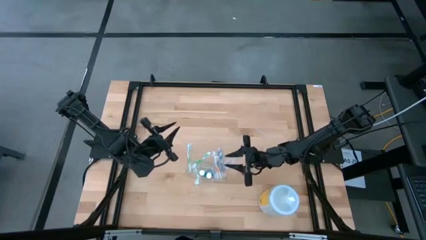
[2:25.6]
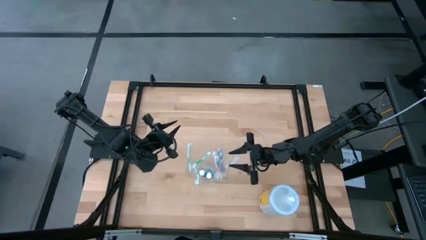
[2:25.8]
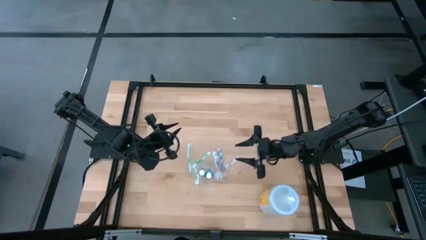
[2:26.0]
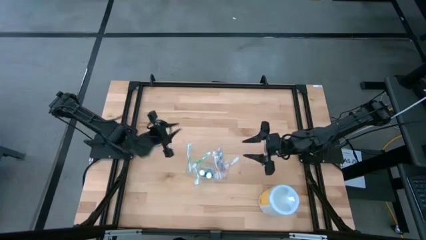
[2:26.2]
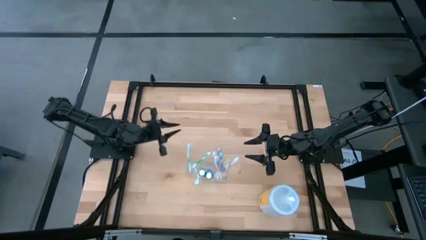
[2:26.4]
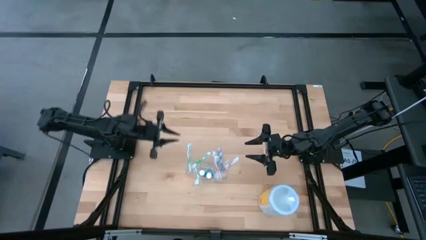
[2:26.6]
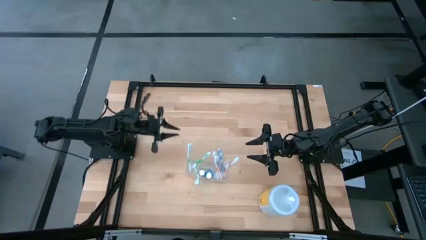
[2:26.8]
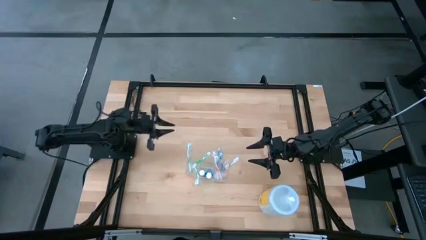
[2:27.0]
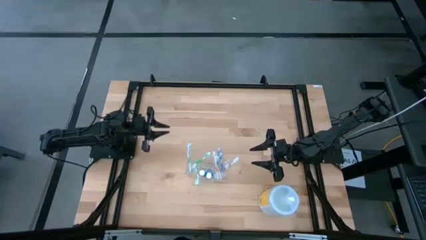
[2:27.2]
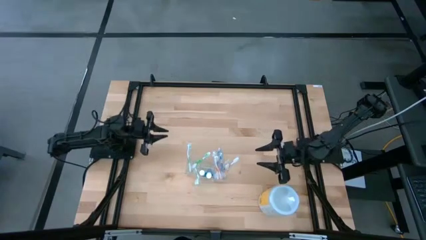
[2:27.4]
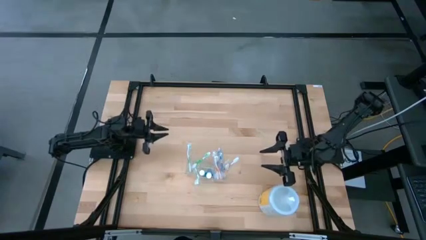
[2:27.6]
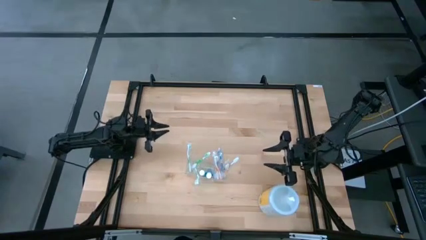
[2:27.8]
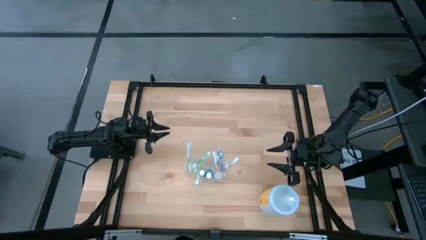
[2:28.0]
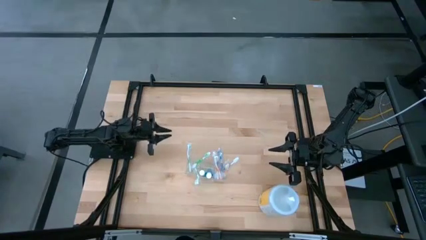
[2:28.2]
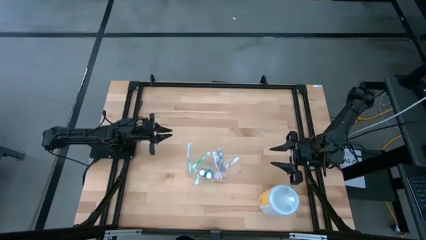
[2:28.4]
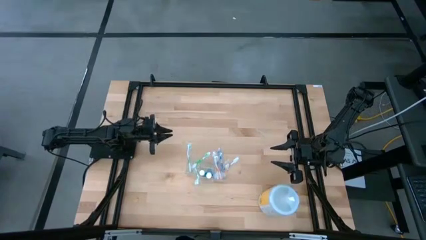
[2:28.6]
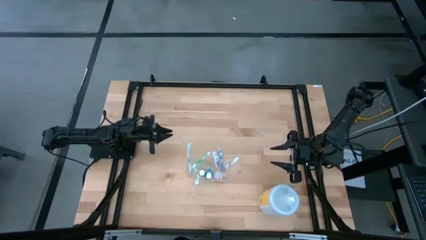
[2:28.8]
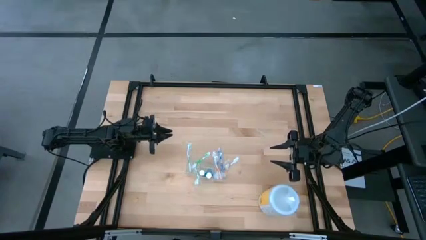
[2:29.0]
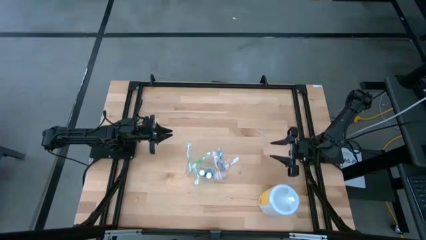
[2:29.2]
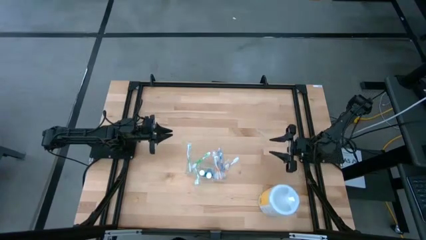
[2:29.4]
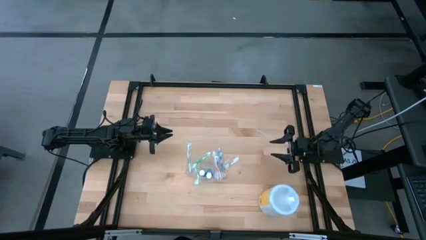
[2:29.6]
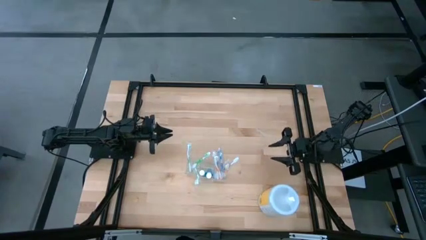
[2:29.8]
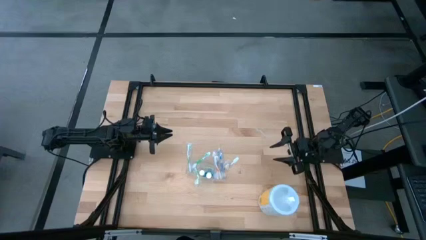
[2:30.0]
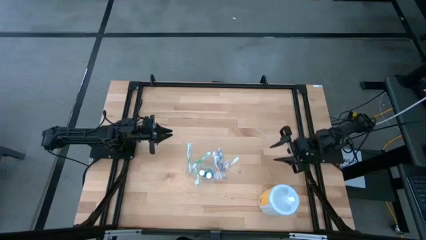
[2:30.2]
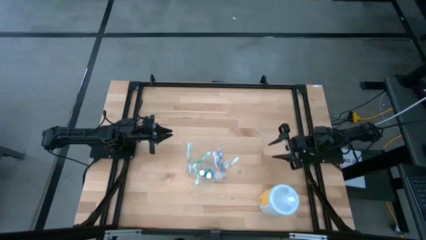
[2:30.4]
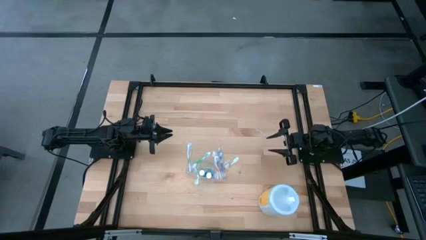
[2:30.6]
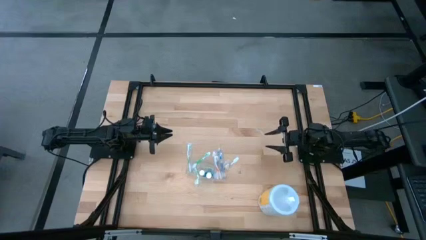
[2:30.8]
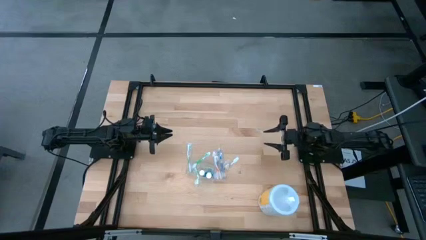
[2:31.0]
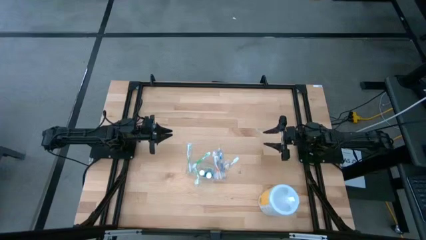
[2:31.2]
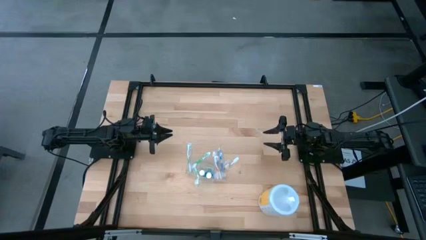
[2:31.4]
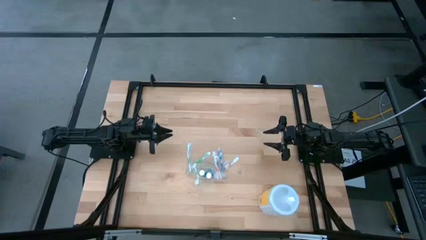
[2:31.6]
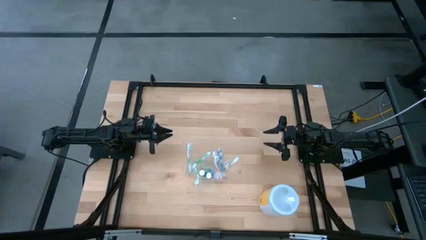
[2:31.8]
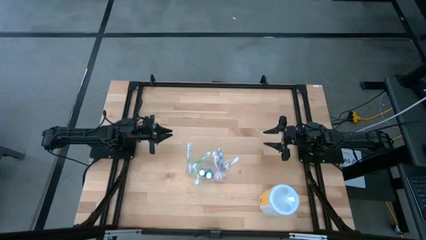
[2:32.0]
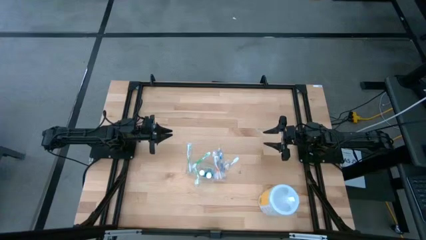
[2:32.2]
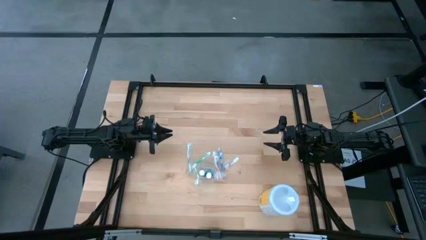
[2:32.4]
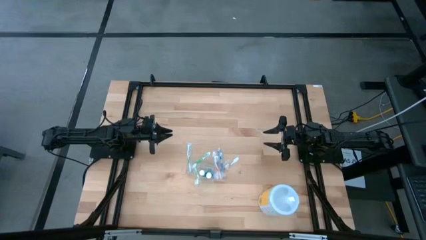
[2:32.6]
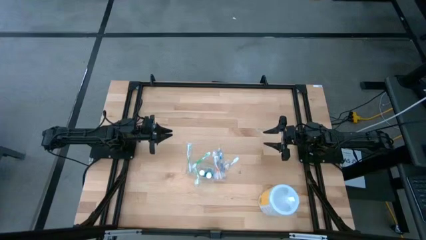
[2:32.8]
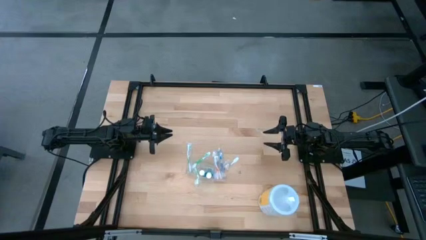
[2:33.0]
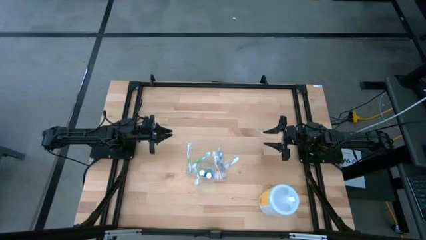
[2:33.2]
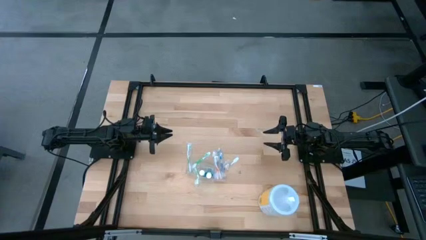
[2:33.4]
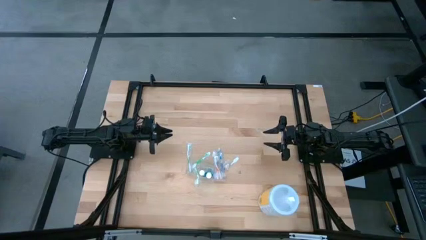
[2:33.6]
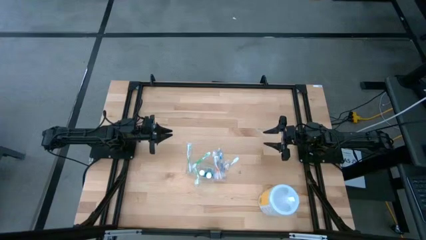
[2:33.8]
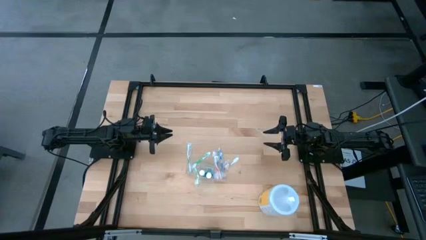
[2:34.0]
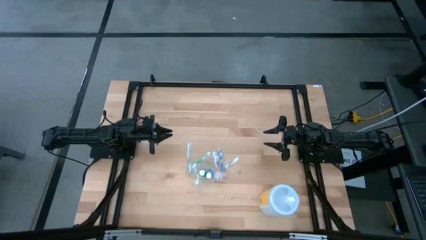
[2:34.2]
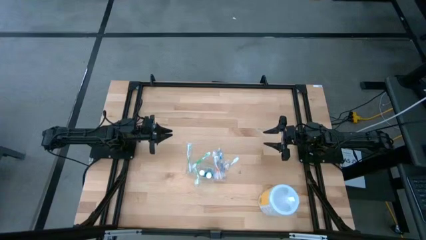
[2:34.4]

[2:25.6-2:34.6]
Task: Pick & Place toothbrushing station
Return to Home Position

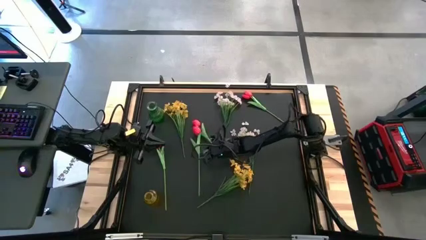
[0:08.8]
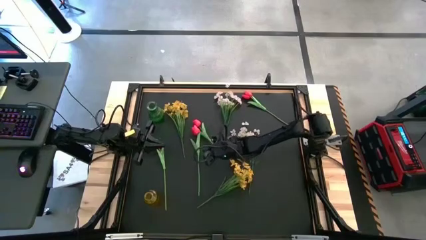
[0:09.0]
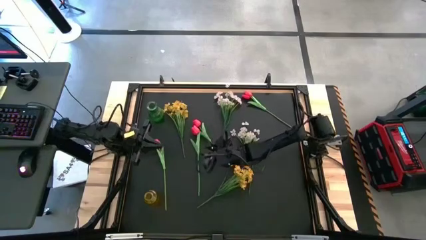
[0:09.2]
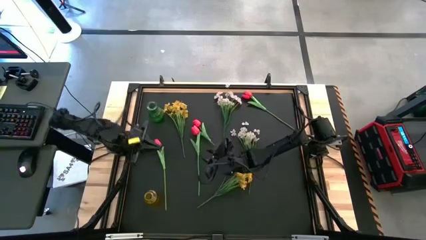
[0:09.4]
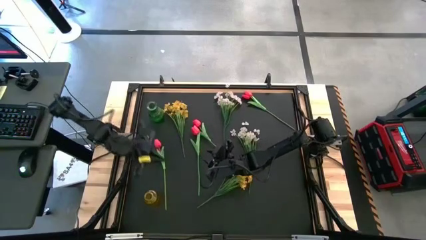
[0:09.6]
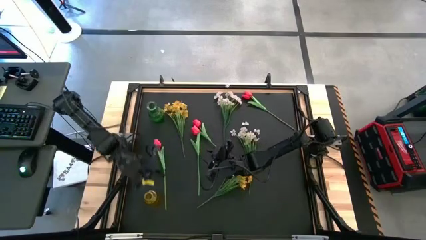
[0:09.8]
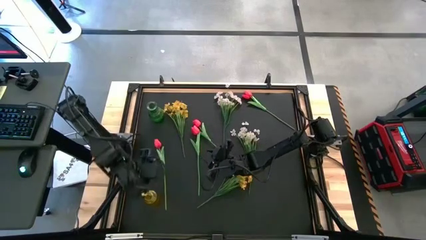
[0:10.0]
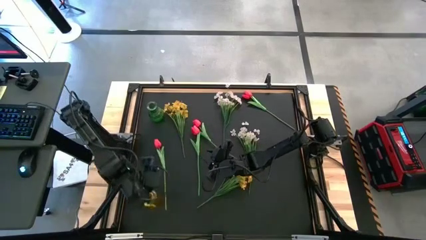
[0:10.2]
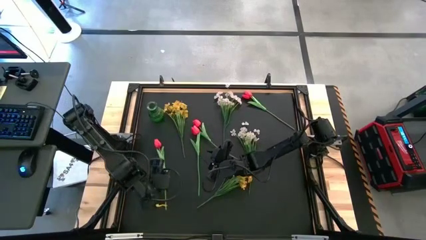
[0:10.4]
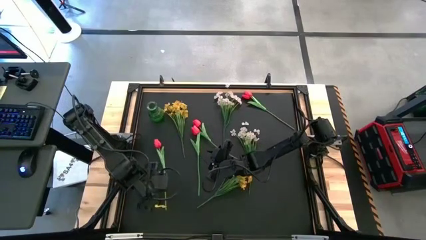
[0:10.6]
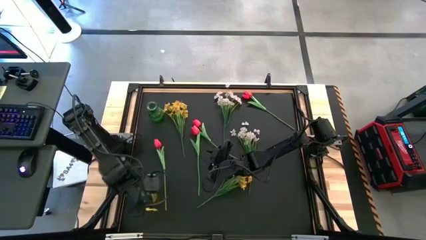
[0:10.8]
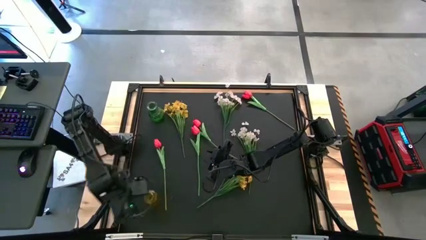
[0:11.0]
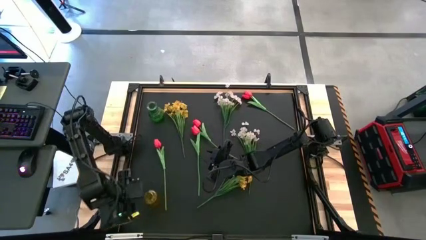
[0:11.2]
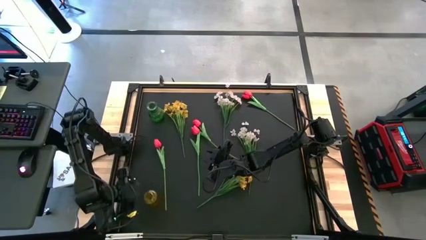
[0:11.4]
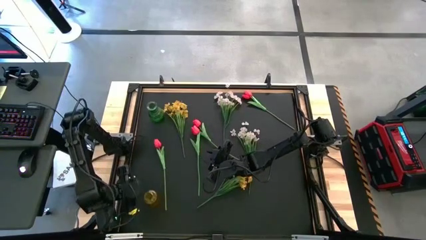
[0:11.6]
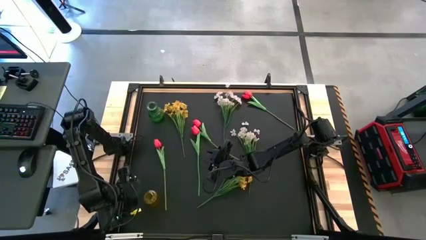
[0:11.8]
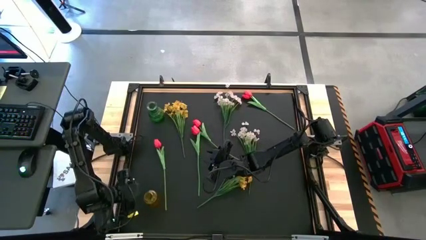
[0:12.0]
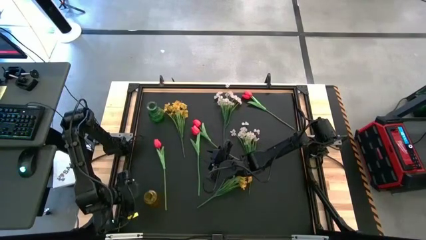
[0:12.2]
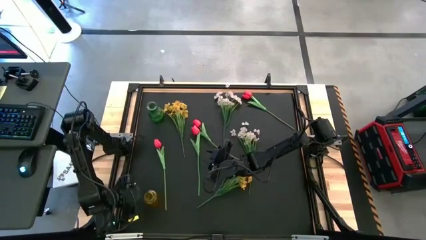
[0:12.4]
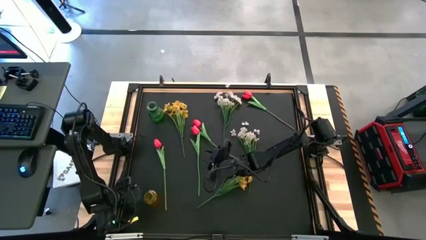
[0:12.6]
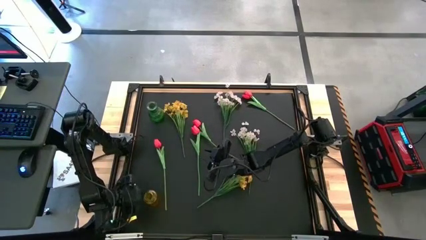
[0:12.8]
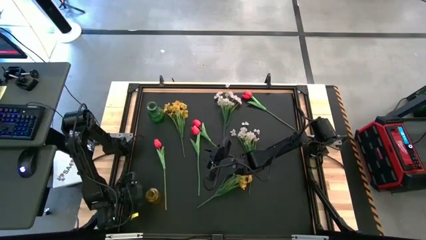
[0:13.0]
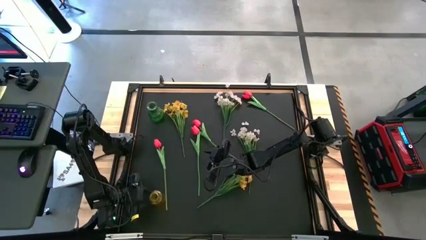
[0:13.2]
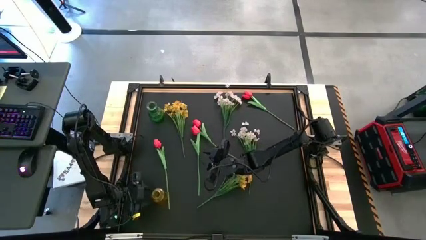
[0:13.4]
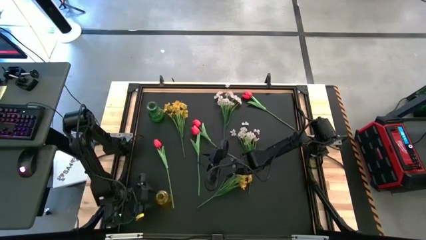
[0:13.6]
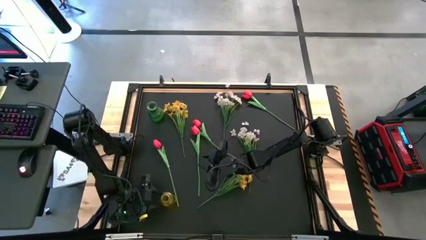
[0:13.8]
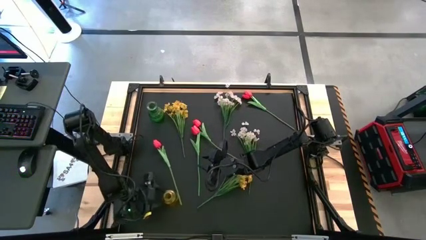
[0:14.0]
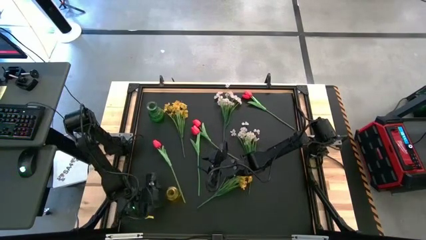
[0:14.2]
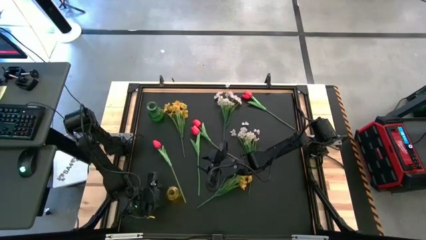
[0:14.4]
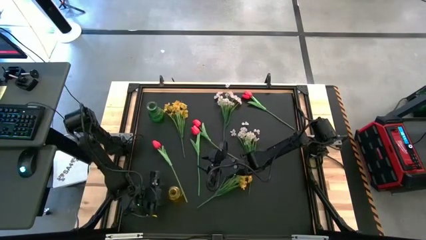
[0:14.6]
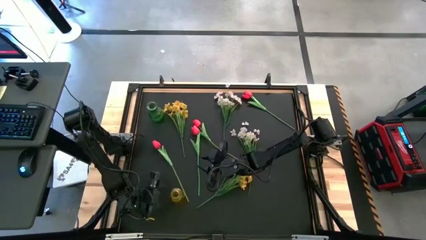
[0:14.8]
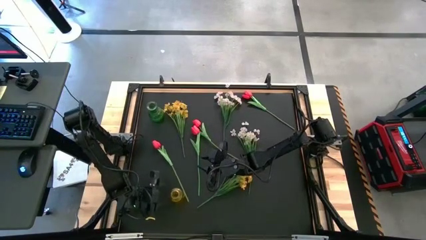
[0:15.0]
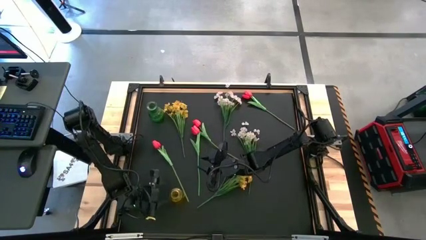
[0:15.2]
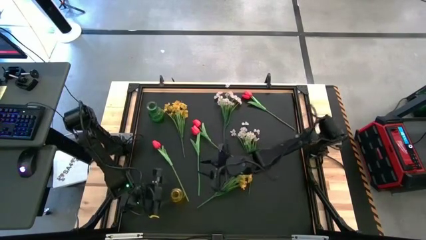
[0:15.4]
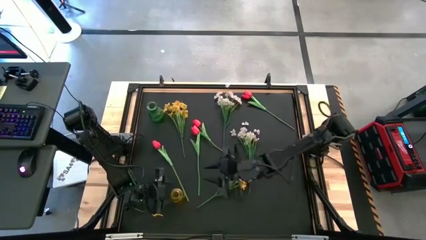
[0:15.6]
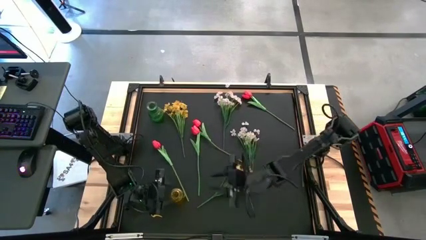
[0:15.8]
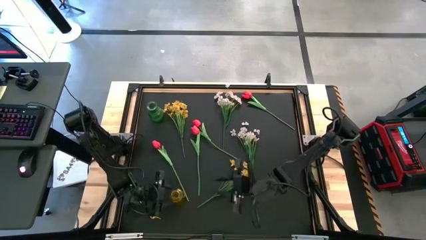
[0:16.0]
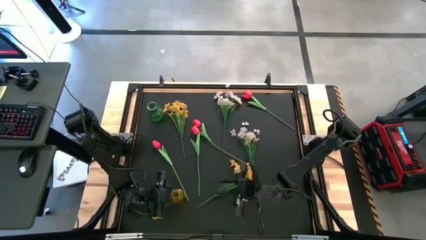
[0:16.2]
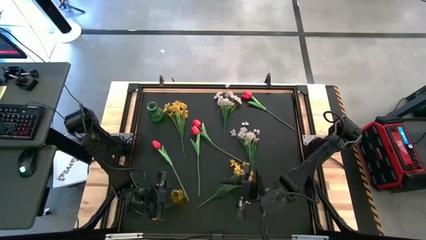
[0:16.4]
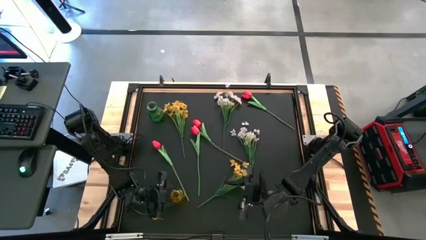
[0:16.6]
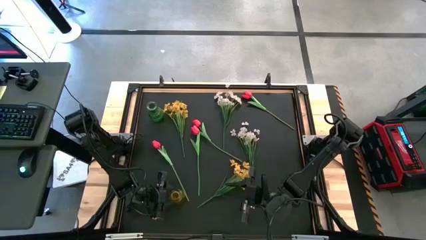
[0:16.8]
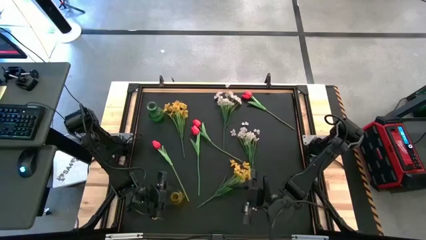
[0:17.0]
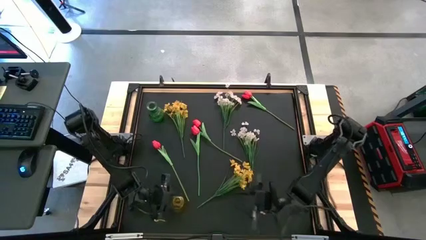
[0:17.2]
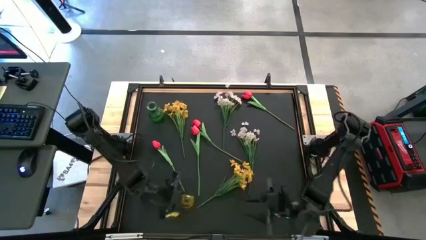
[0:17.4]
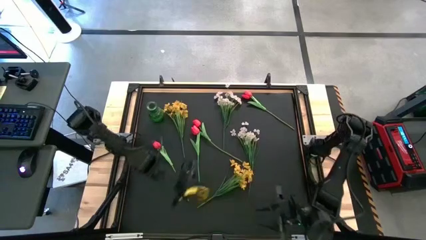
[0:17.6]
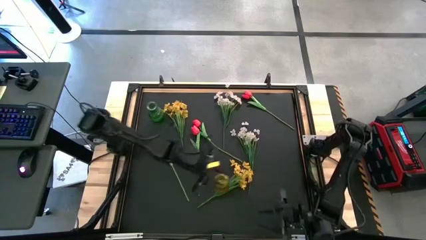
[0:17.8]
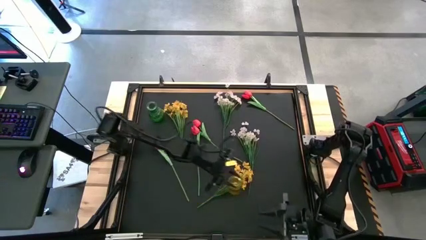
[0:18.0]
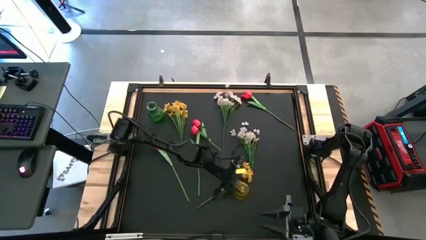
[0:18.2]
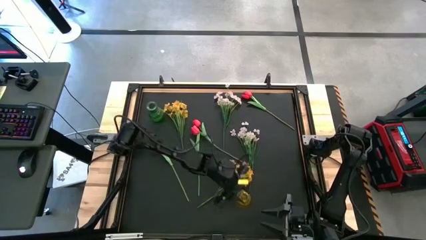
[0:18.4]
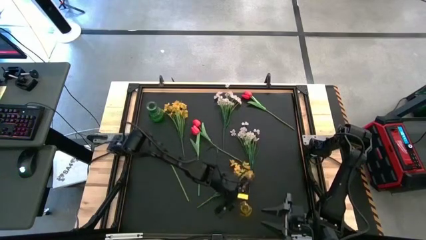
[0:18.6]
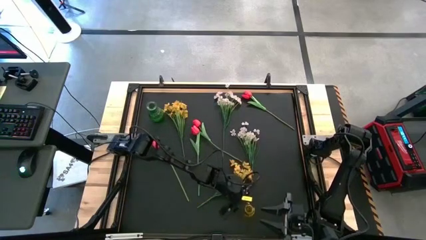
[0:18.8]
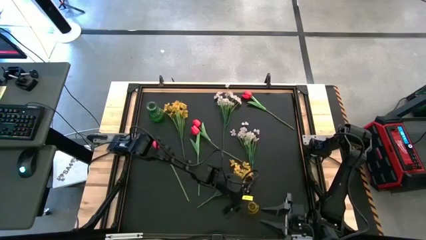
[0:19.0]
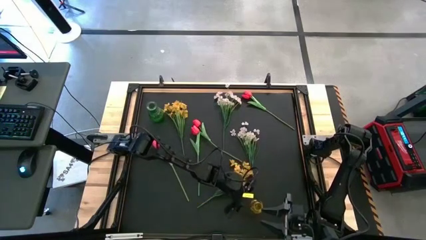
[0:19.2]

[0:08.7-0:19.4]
Task: Sort flowers into vase by color
Move the yellow vase to the bottom right of the table
